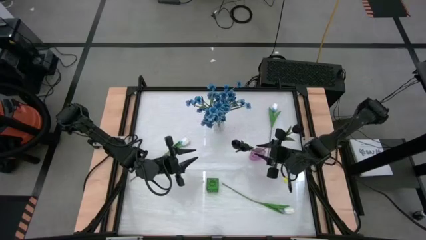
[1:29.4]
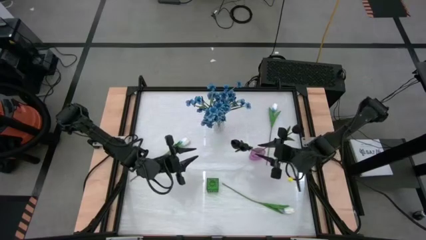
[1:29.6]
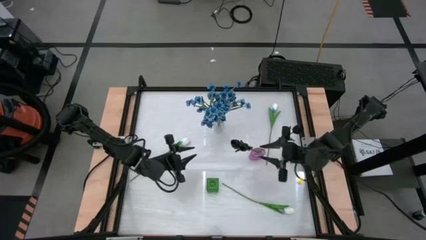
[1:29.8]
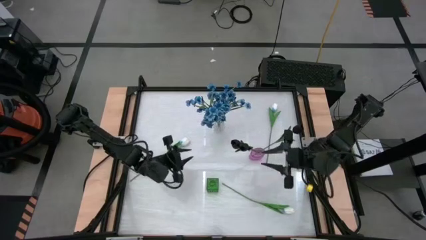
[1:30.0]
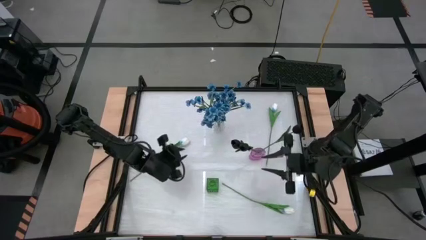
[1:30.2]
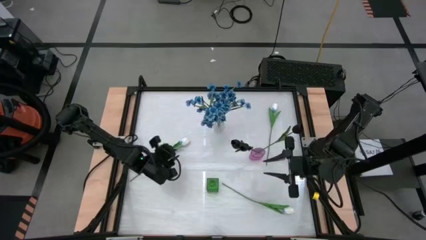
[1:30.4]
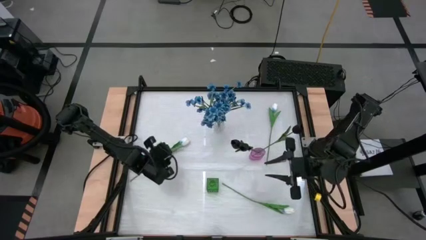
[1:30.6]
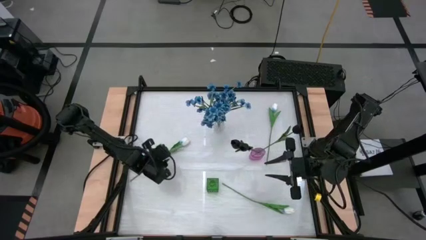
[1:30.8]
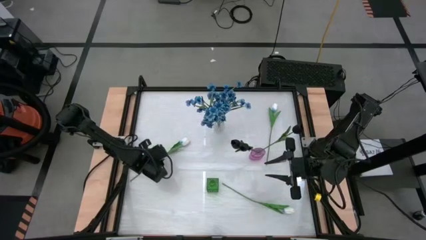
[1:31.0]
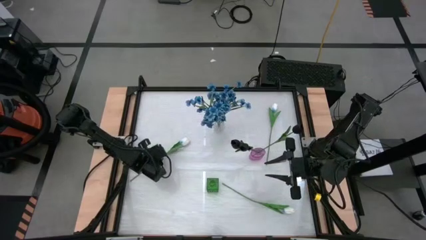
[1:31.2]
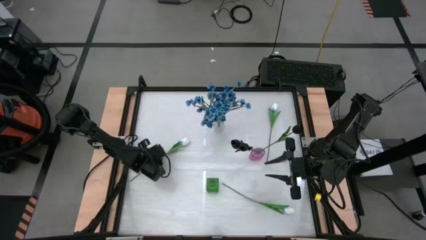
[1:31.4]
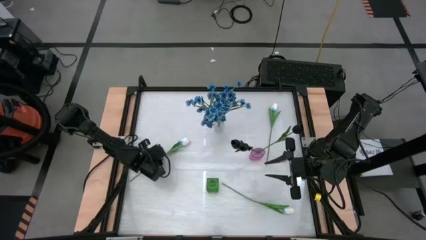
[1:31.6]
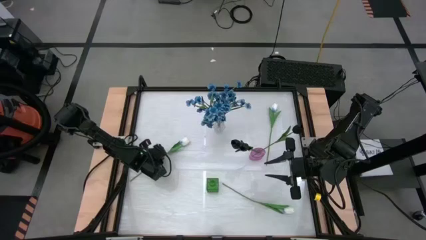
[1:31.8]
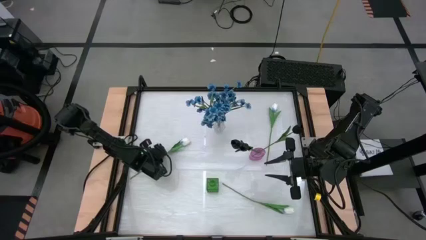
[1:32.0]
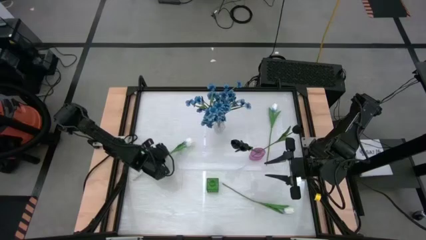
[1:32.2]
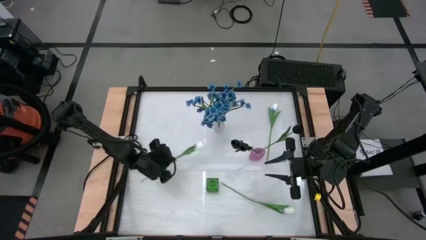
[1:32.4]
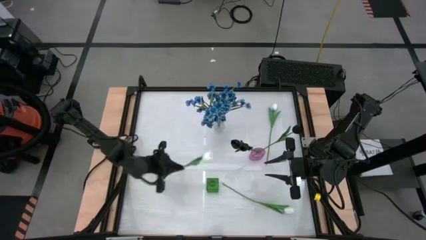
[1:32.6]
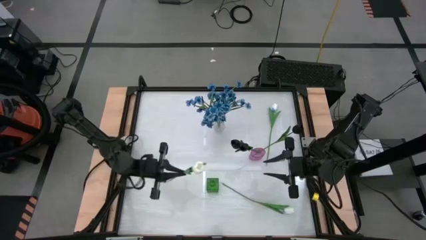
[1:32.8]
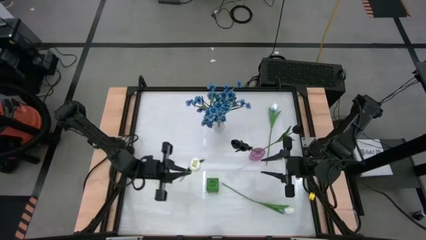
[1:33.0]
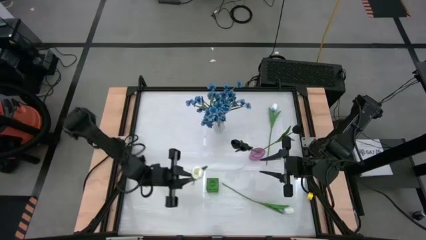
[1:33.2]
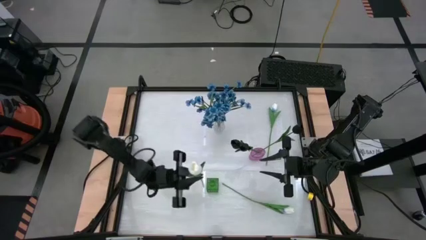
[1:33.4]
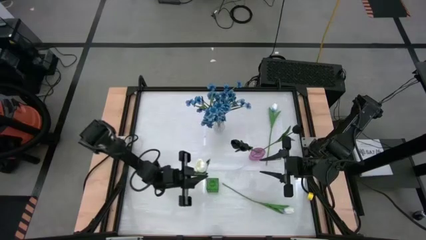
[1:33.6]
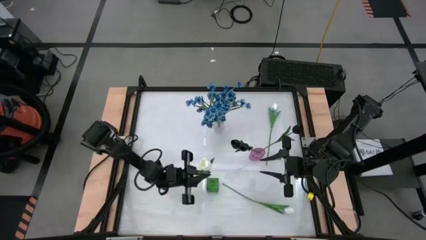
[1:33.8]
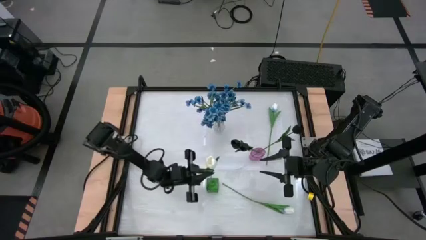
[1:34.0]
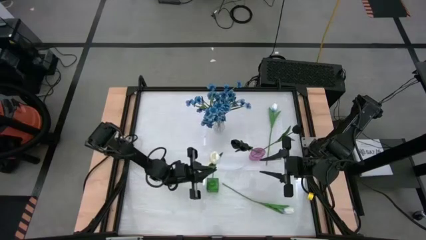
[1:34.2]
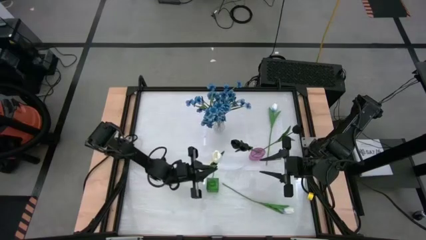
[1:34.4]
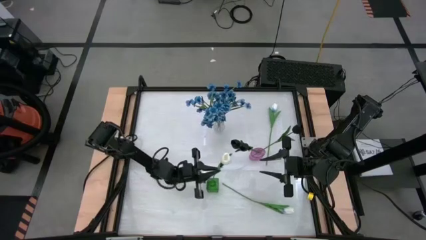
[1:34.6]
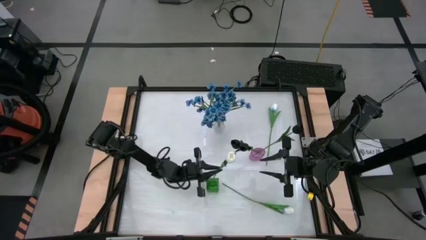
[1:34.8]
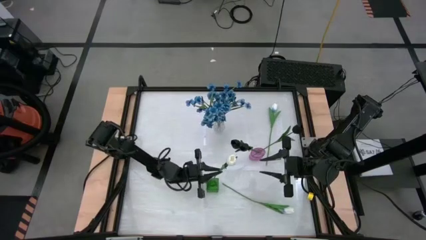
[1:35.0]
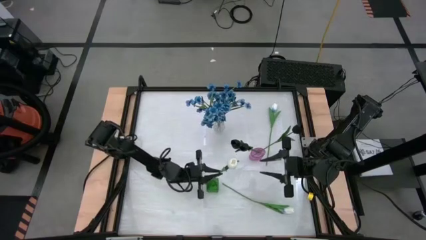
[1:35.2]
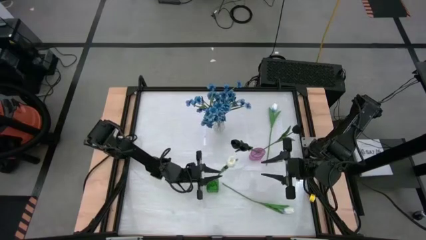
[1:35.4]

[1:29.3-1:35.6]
Task: Sort flowers into vase by color
Put the left white tulip into the green vase

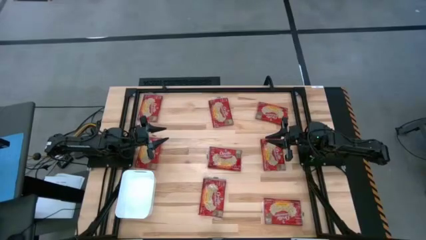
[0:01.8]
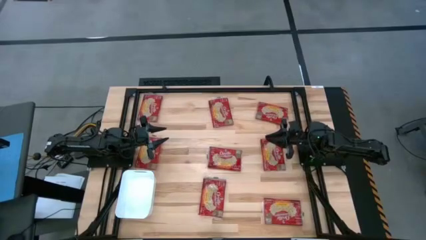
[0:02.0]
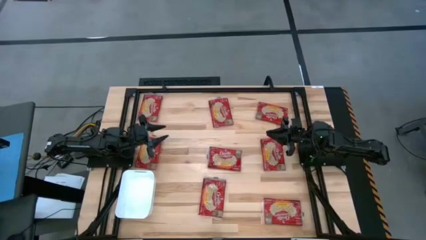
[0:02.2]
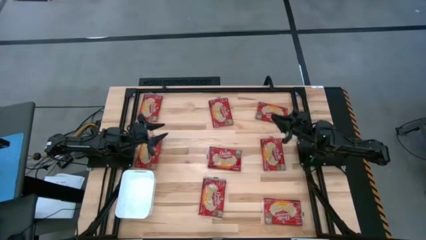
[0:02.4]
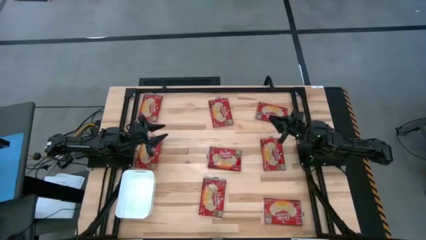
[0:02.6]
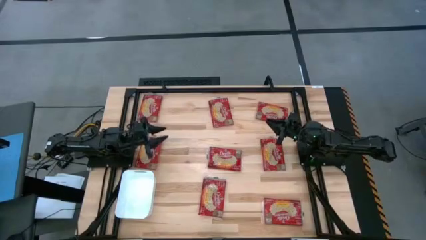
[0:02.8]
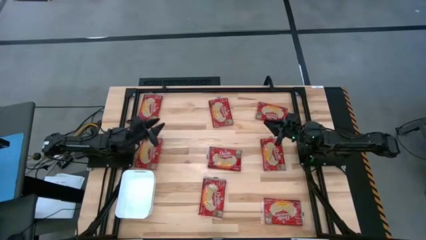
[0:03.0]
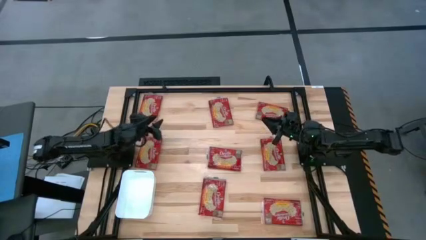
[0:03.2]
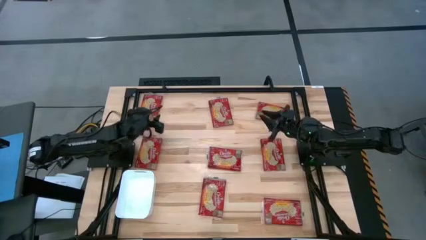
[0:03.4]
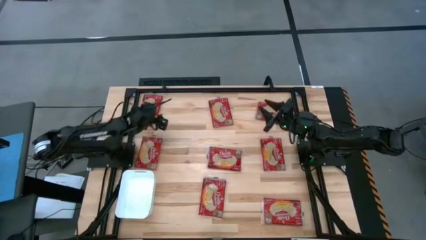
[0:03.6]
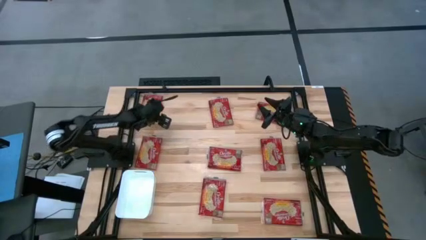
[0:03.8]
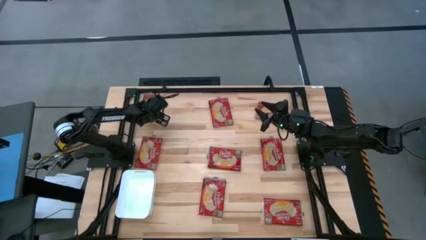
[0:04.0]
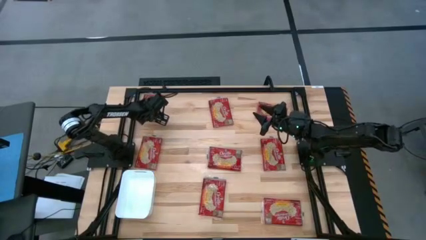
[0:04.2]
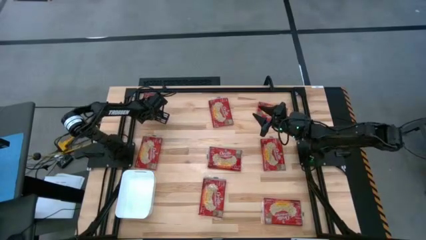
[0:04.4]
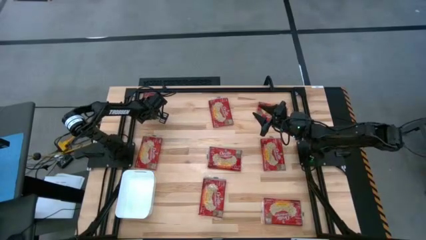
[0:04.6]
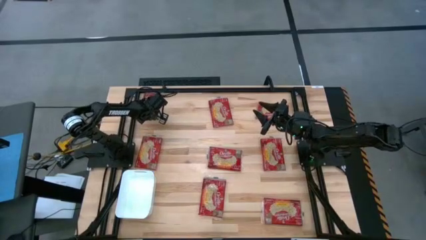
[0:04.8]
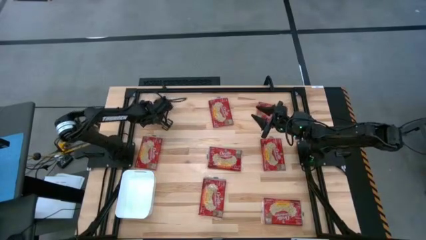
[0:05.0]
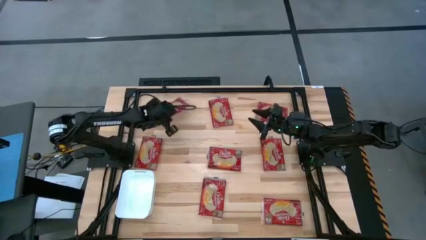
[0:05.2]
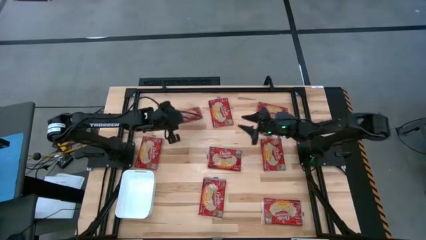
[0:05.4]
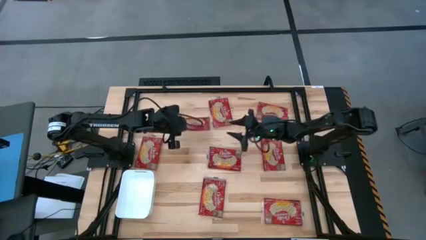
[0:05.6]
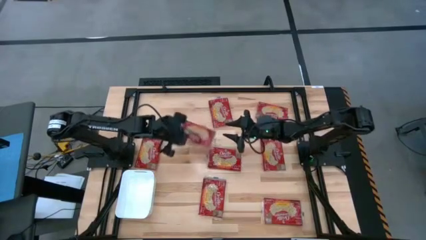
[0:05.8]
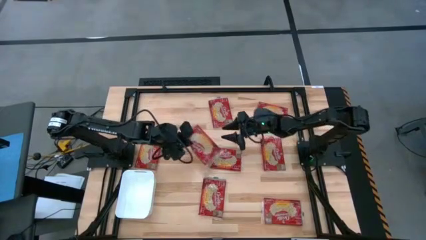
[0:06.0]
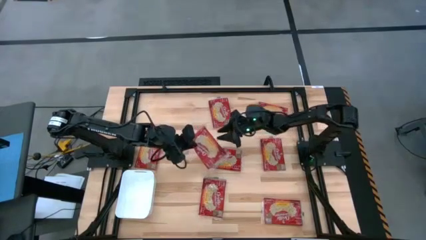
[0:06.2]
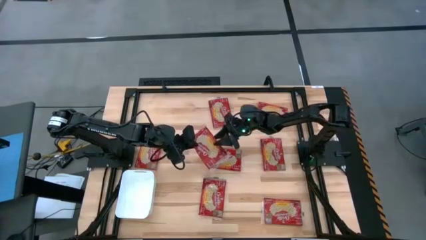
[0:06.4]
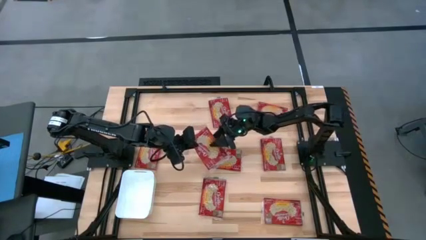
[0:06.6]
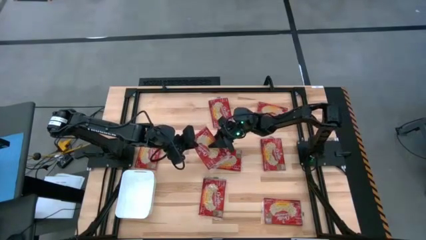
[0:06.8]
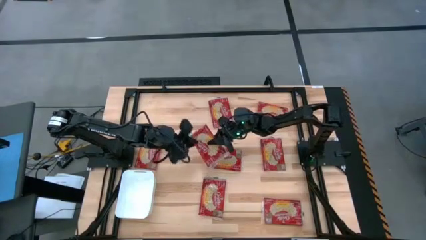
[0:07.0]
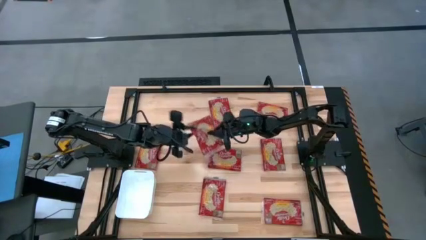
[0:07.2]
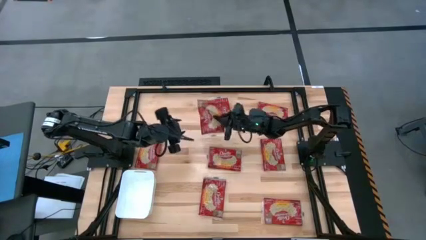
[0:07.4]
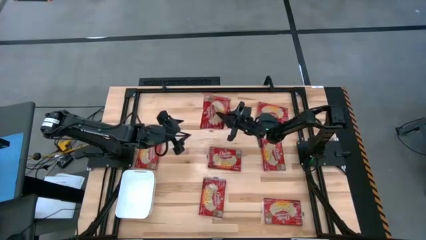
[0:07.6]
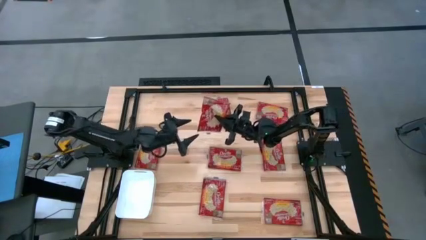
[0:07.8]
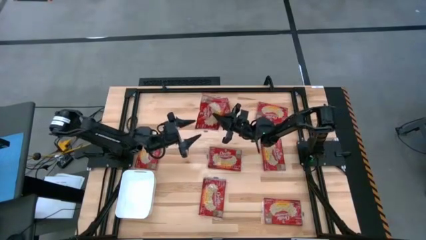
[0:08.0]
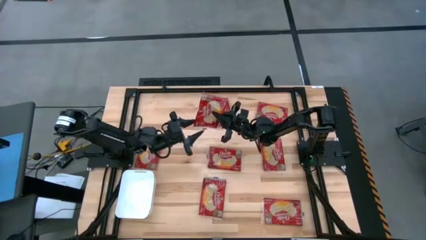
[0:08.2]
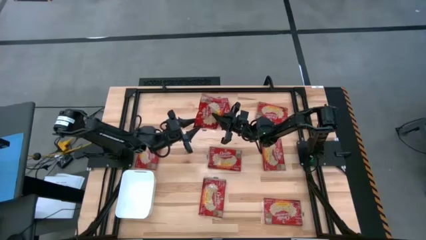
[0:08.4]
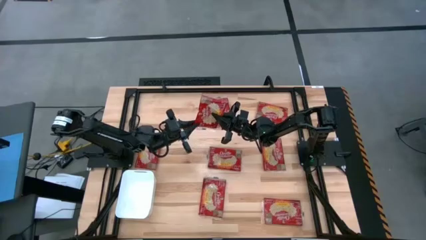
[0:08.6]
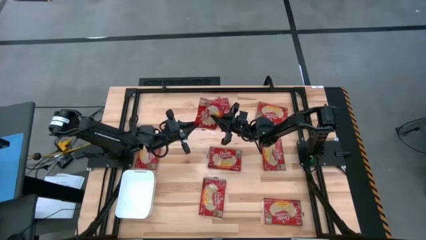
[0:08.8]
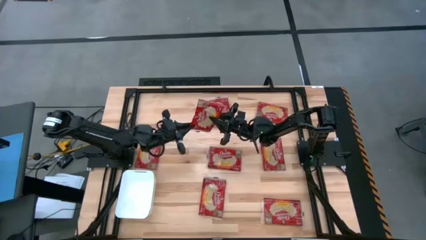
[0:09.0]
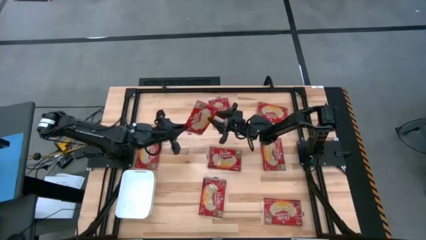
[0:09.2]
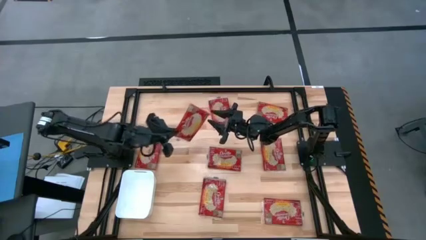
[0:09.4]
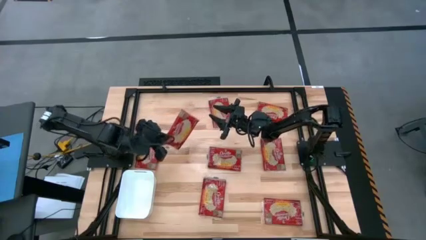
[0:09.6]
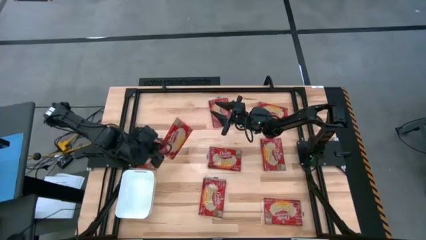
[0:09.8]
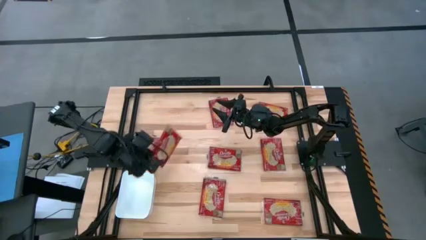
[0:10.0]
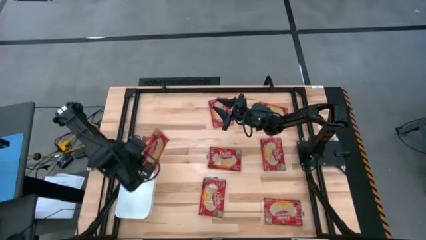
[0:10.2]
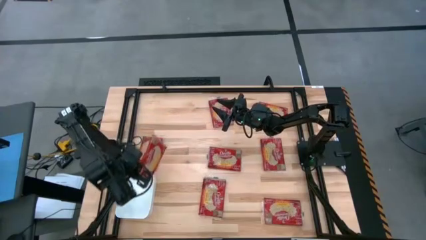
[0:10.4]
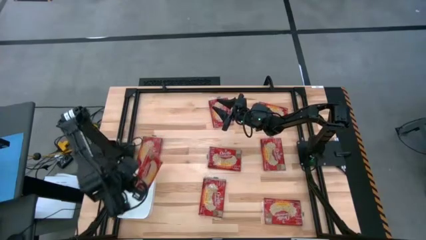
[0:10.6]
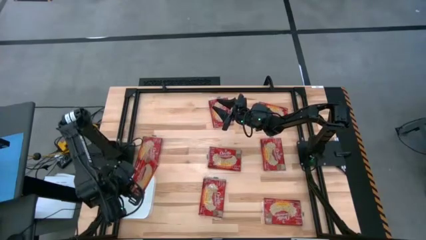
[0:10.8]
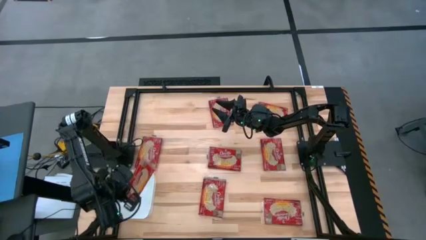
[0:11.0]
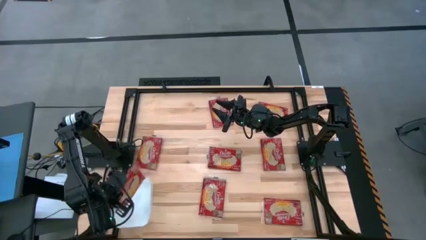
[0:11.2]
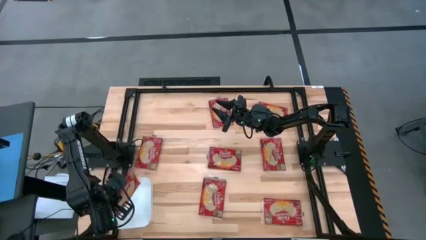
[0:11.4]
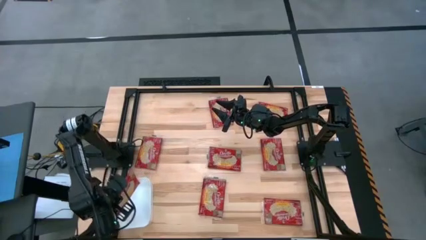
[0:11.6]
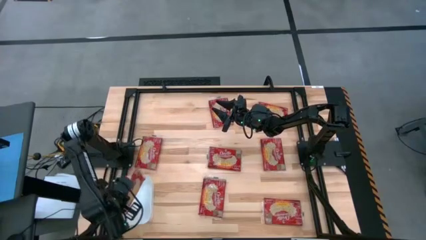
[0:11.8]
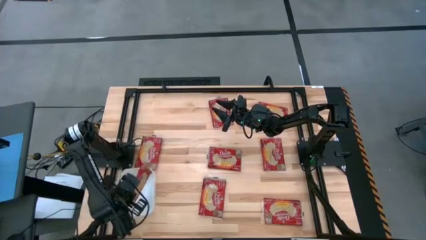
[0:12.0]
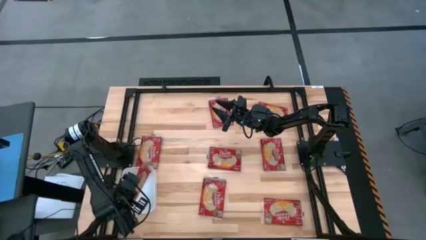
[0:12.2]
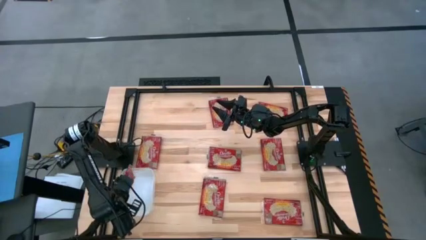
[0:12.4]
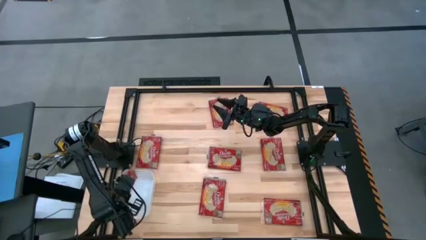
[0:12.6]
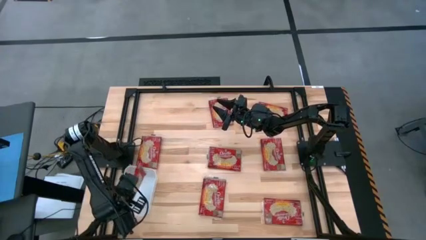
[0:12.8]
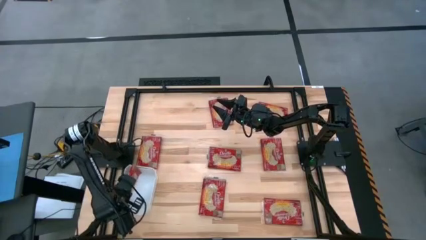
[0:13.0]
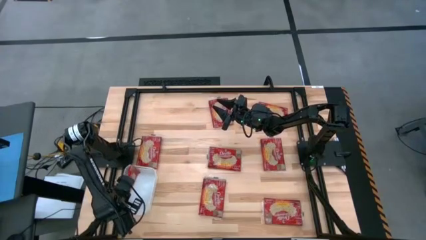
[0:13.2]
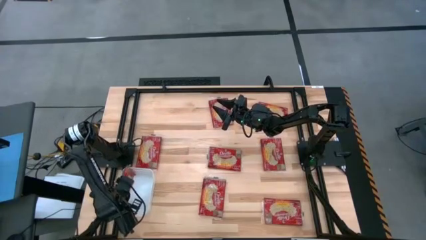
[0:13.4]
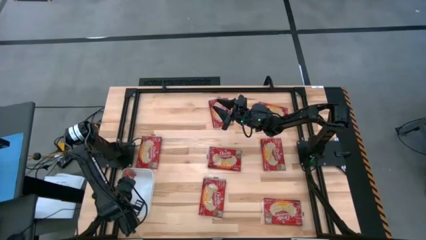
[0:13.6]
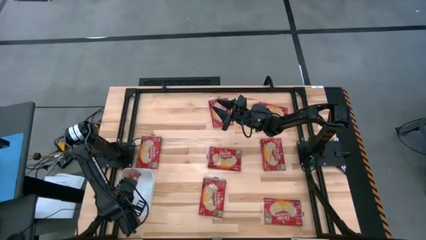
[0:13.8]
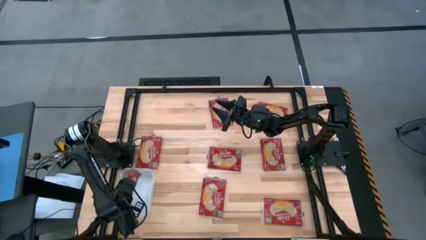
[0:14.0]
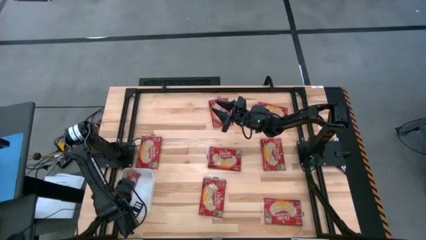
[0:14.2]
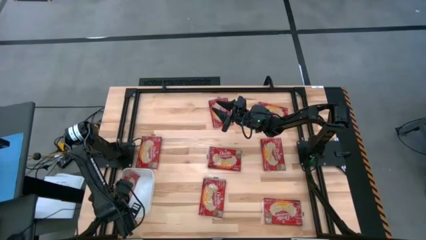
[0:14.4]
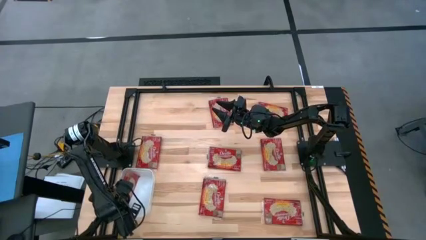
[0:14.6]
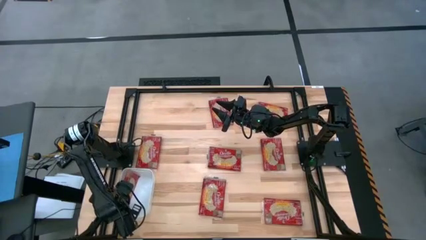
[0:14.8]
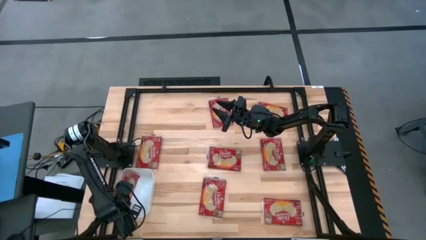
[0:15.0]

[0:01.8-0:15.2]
Task: Sort popcorn bags into baskets
Put the red popcorn bag into the white bin
